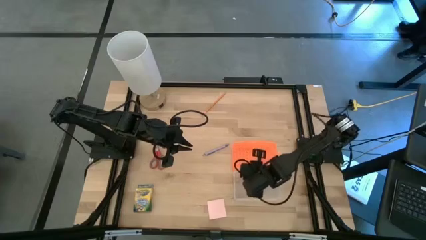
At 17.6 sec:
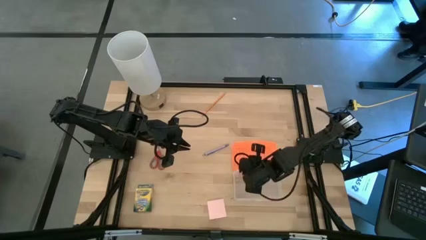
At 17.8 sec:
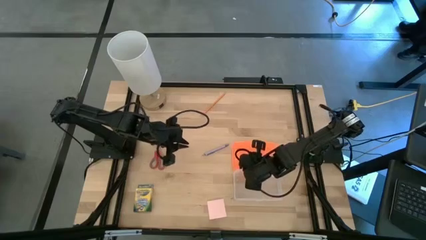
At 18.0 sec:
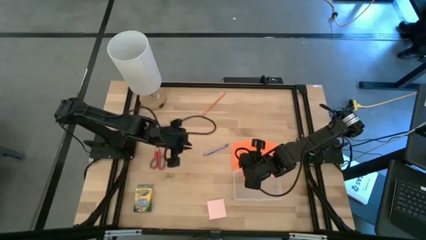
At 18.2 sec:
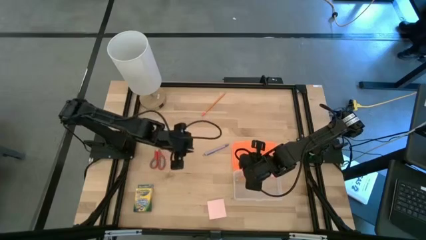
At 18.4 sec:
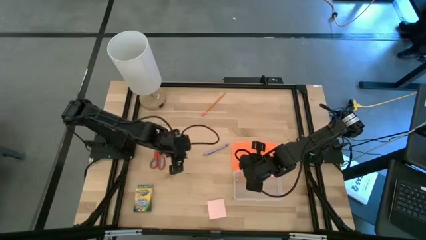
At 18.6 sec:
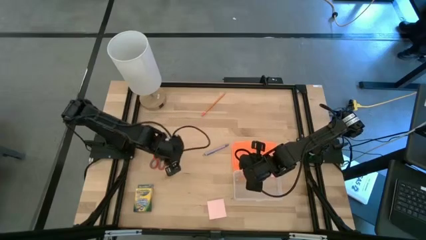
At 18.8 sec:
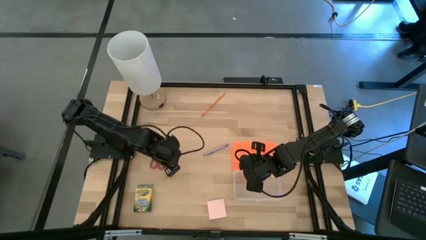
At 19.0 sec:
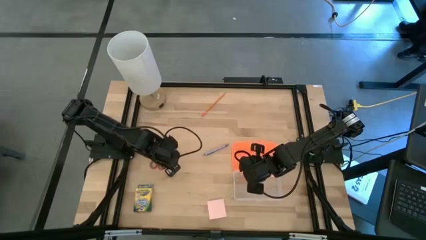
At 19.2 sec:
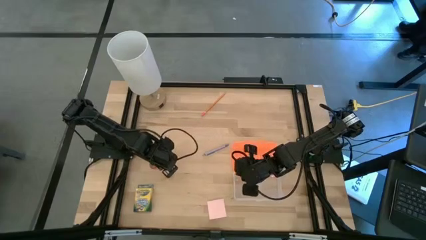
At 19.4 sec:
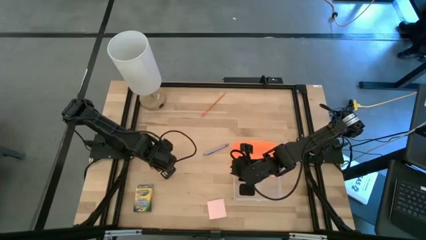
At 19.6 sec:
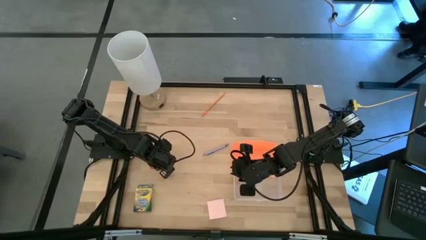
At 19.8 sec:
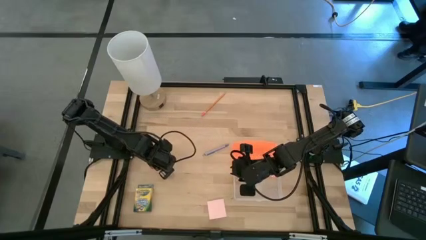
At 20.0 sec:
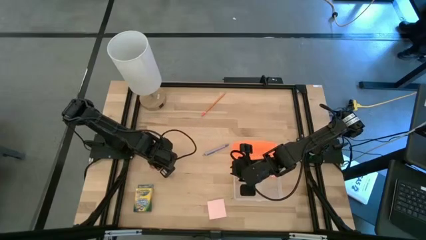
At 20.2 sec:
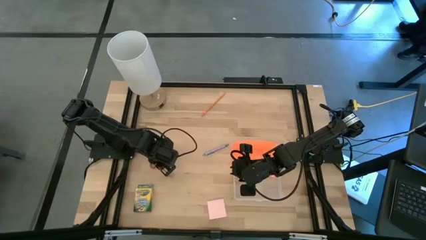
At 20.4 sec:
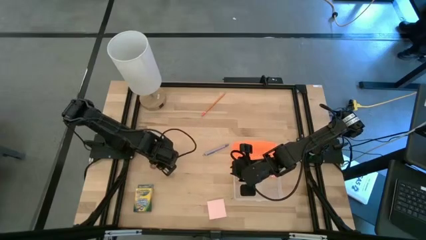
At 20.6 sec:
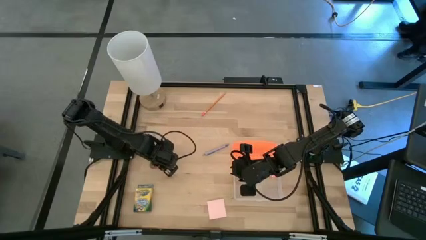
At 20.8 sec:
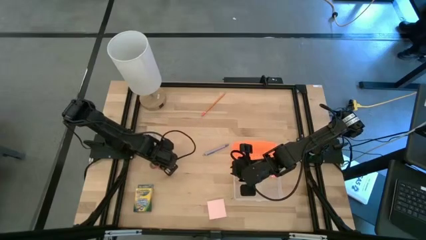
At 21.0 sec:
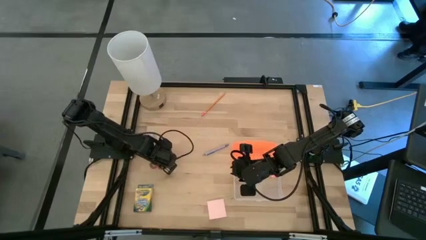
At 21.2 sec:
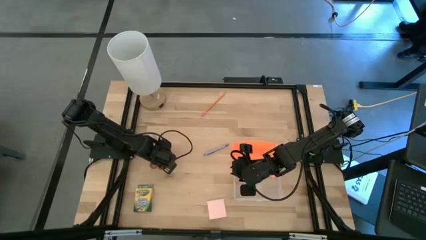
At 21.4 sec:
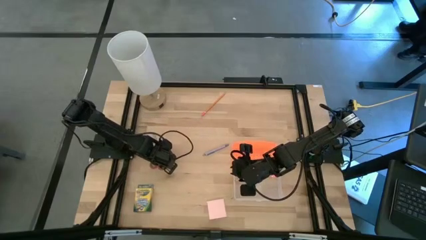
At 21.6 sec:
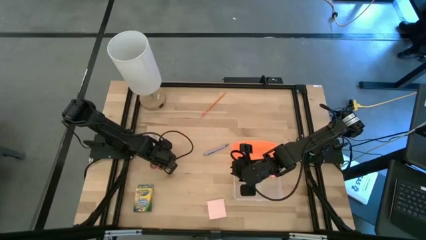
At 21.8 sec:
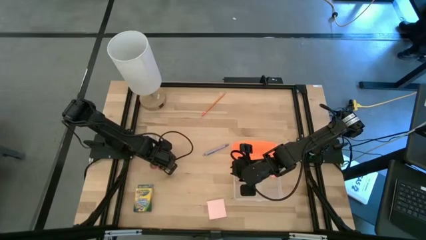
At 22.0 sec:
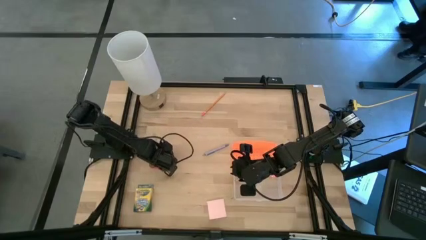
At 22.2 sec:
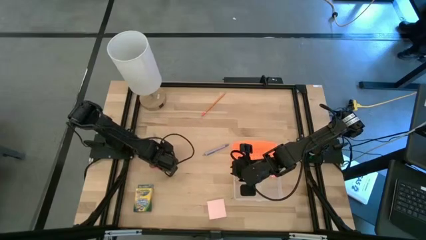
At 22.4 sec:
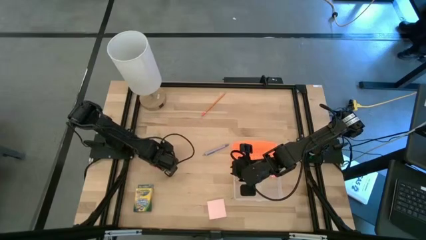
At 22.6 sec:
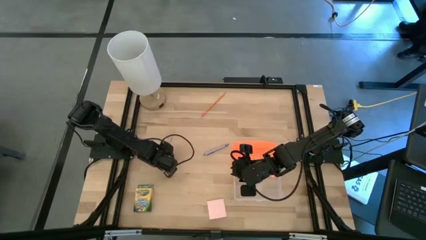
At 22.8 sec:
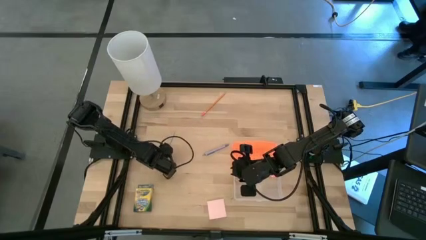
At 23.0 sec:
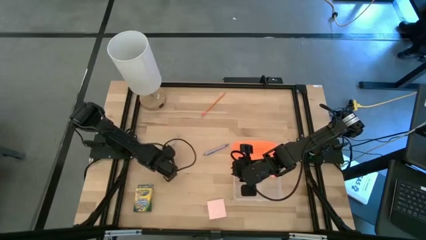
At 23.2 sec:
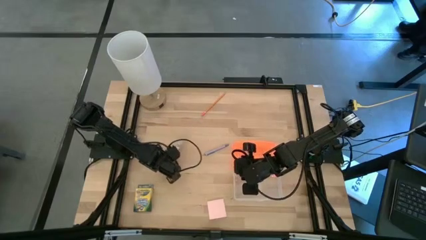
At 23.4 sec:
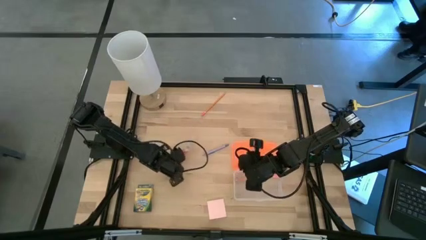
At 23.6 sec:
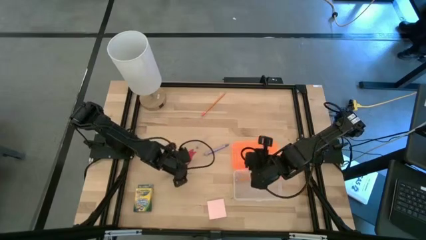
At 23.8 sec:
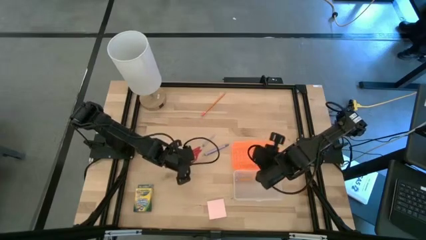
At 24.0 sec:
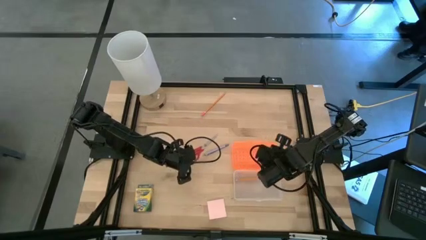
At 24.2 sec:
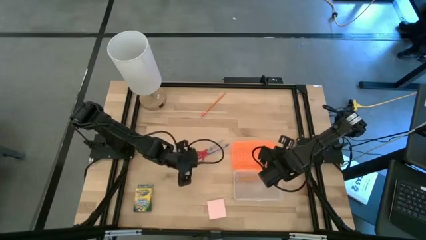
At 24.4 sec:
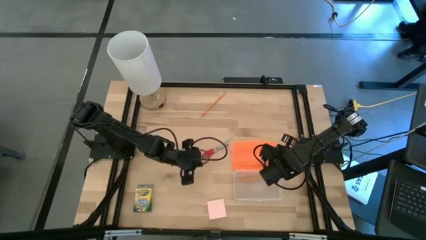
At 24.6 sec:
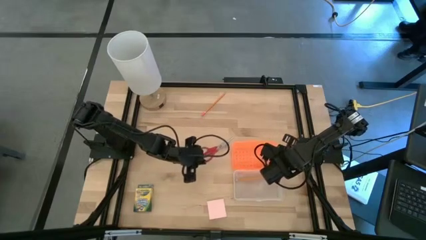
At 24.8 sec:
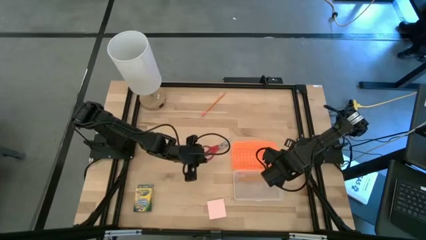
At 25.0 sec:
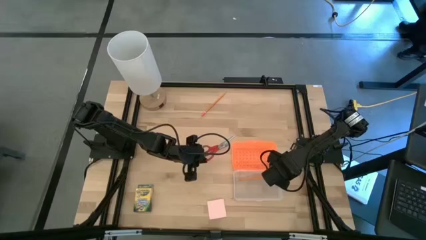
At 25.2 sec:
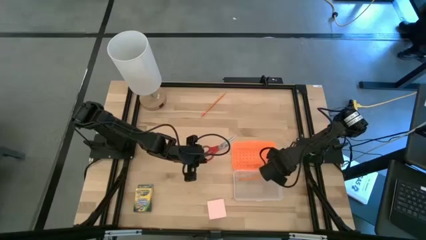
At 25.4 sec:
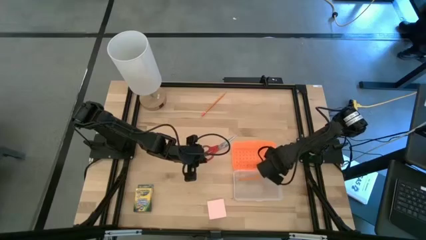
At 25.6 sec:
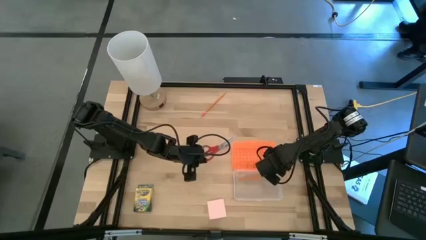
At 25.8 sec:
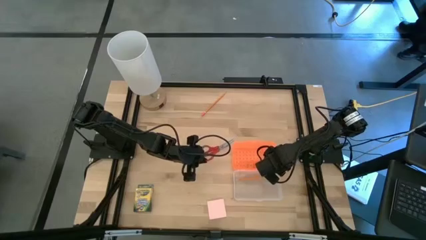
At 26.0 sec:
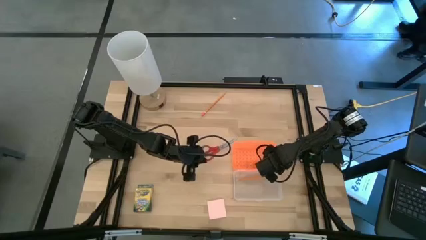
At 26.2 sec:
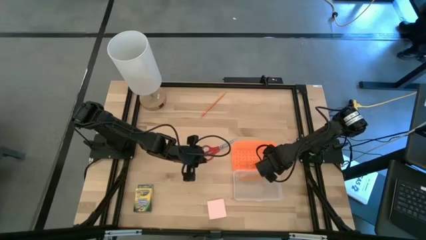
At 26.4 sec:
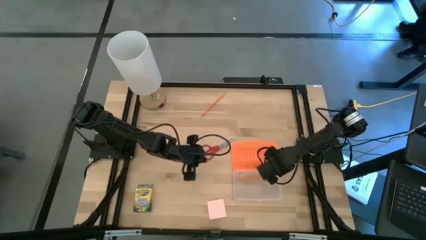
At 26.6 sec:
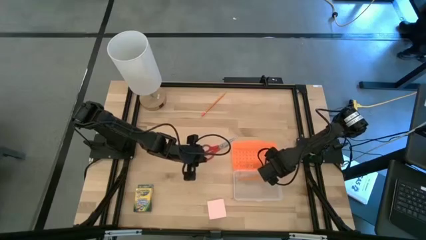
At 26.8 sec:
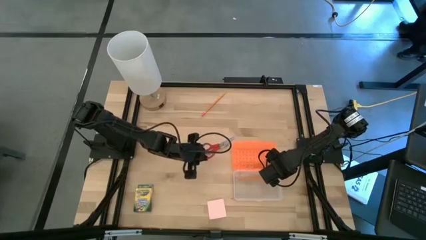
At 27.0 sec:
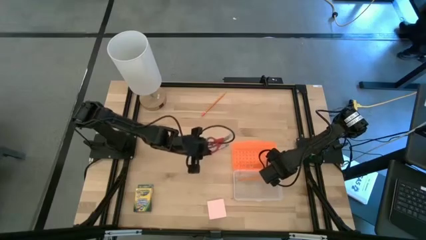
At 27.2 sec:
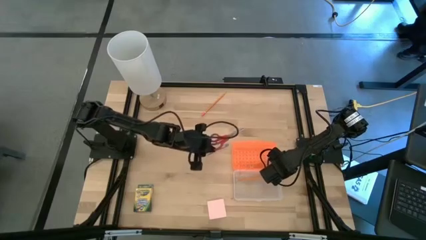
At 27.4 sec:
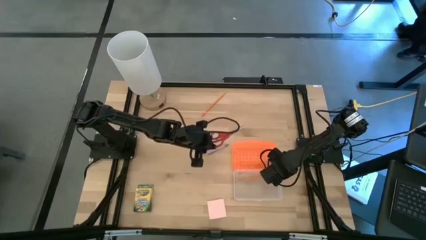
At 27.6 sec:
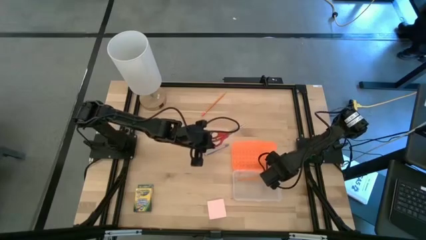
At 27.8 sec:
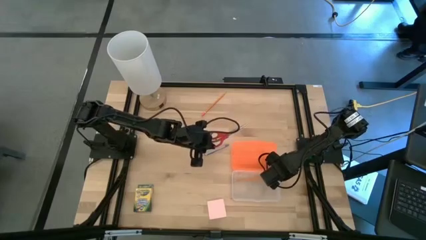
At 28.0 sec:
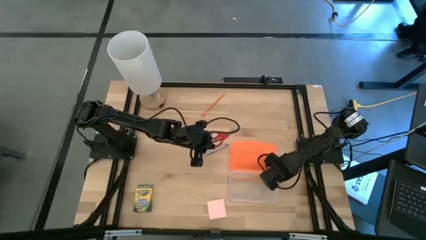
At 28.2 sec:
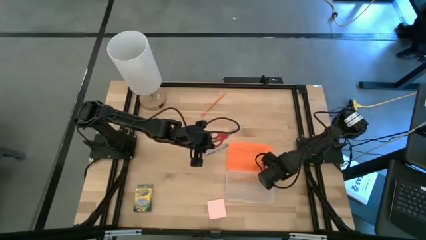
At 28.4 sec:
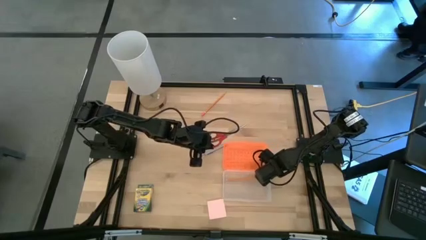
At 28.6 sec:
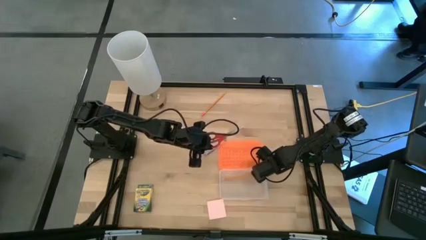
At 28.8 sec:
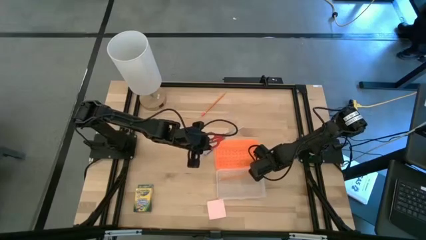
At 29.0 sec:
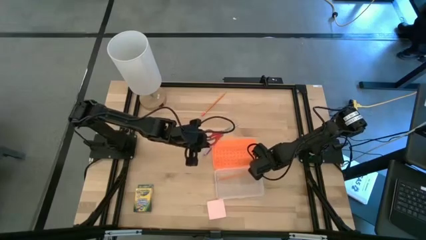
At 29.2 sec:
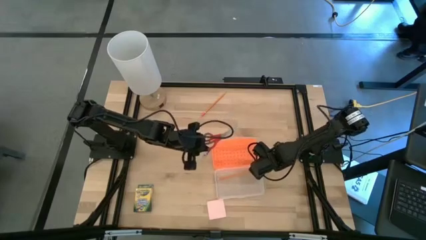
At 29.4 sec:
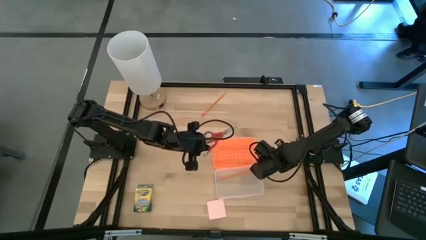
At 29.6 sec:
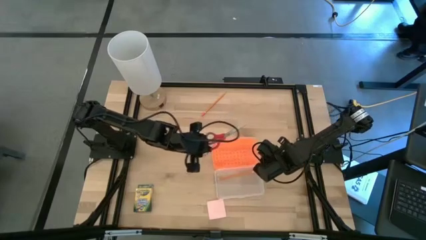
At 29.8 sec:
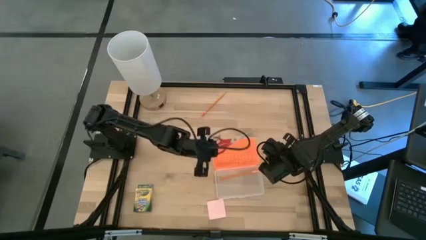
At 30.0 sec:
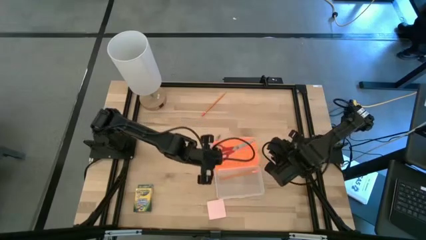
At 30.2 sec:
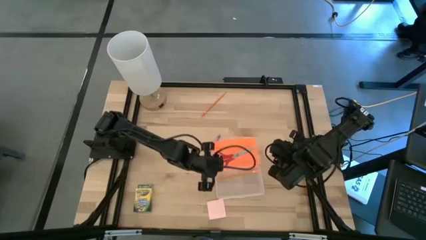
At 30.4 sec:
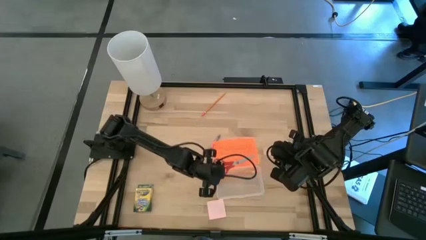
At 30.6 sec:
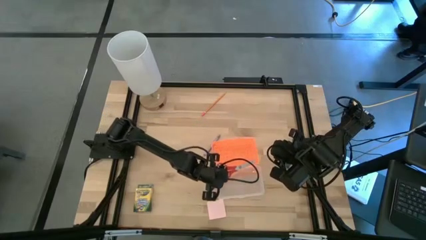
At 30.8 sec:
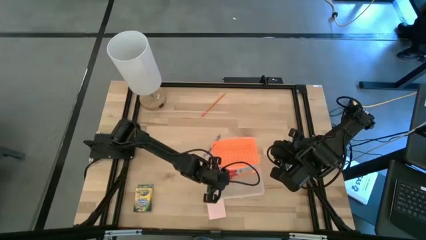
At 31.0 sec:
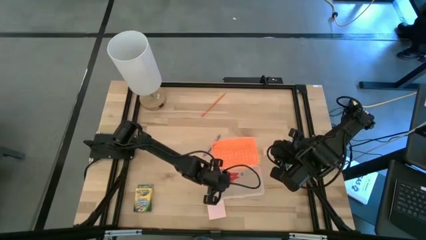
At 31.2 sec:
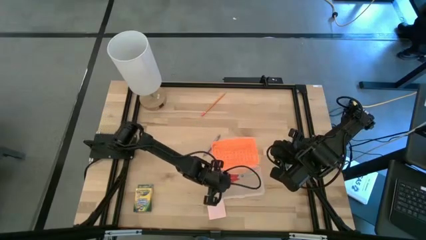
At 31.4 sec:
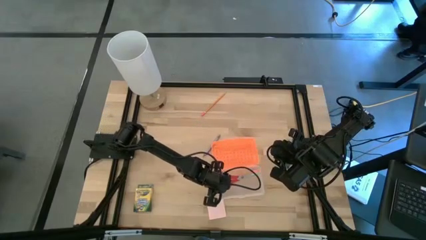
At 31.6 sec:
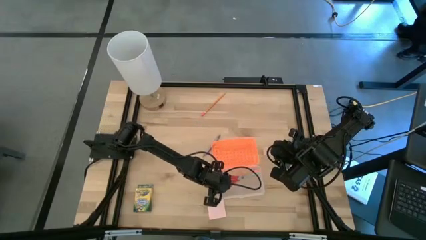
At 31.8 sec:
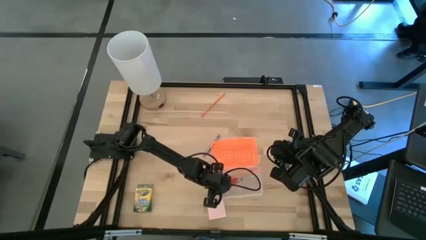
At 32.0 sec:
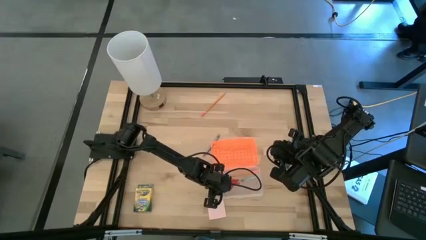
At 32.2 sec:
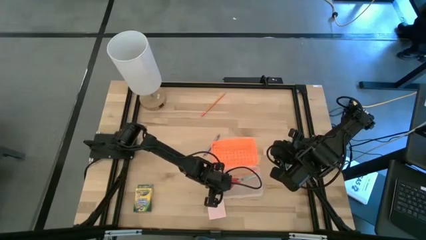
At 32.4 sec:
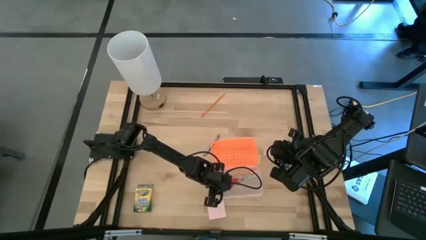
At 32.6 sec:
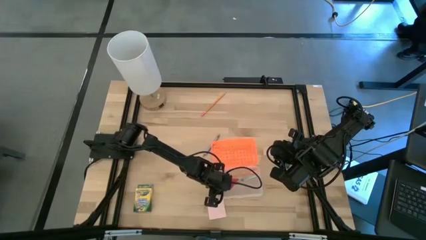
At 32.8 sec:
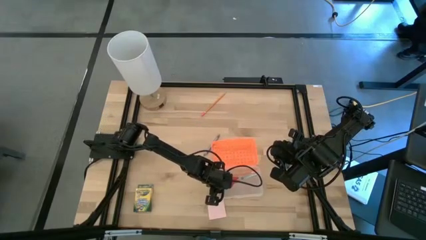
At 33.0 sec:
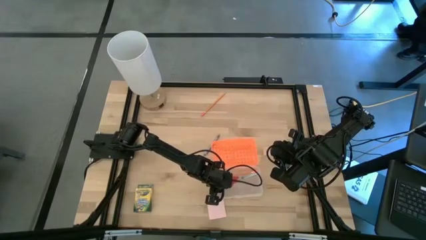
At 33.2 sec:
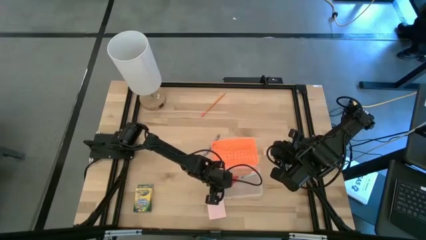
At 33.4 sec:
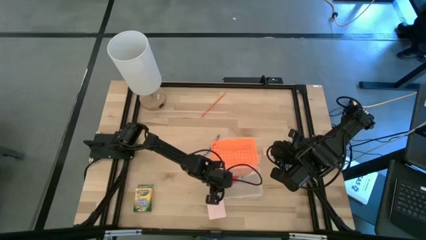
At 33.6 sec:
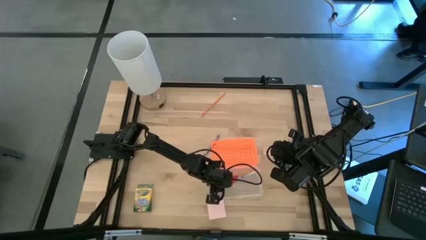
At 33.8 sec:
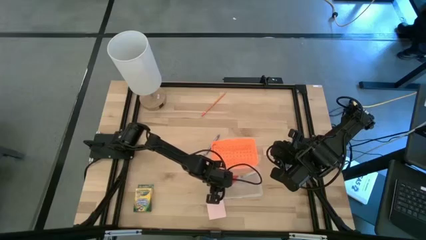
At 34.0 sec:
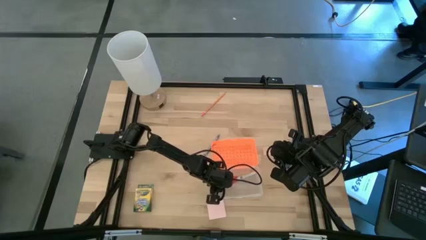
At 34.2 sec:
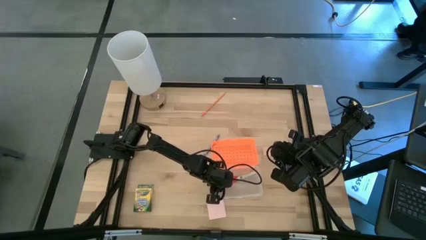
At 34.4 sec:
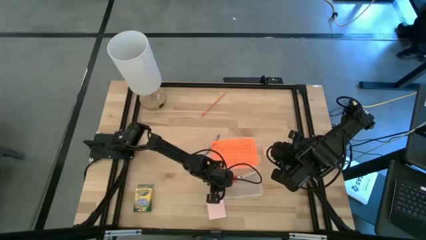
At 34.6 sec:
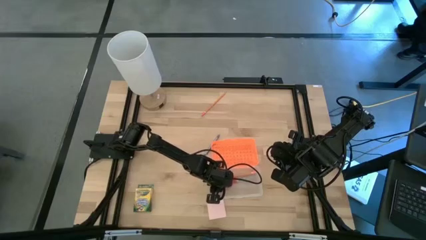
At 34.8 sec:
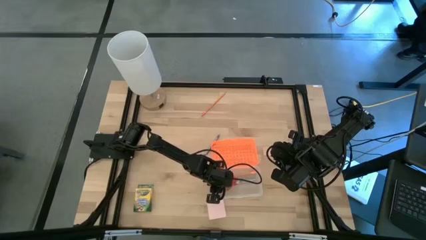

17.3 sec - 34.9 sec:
Task: Pack school essentials
Put the red scissors into the orange supply box
